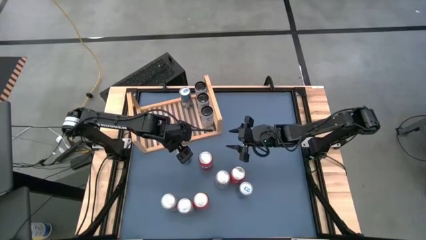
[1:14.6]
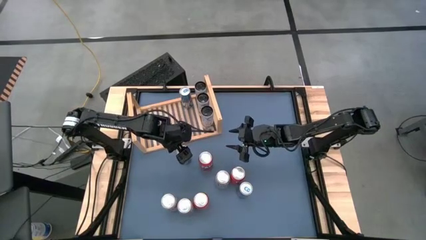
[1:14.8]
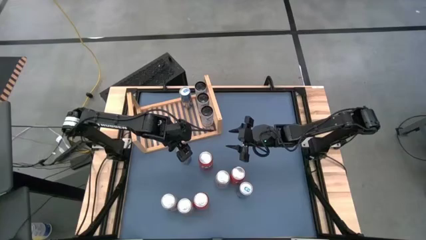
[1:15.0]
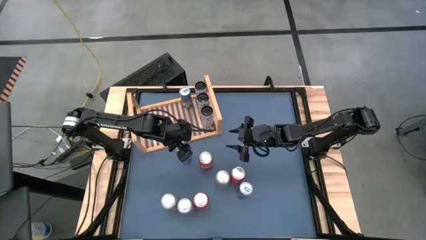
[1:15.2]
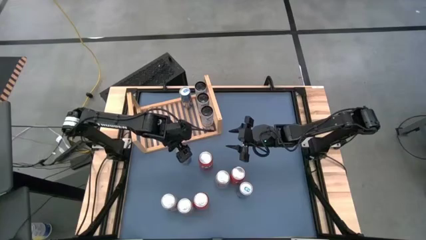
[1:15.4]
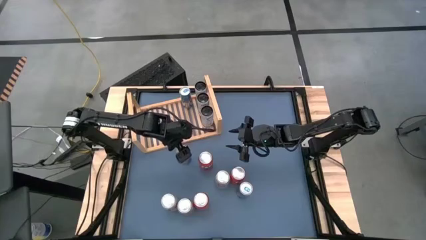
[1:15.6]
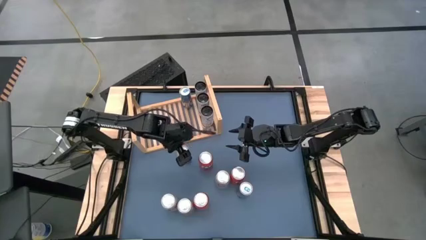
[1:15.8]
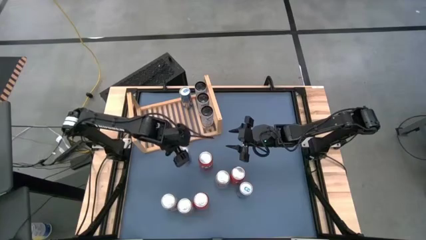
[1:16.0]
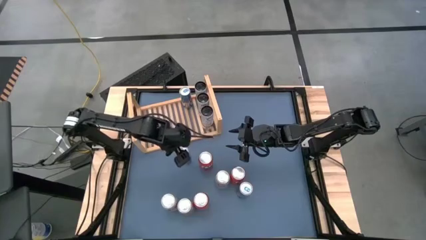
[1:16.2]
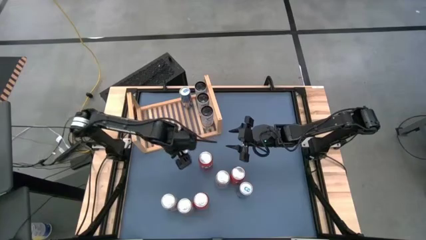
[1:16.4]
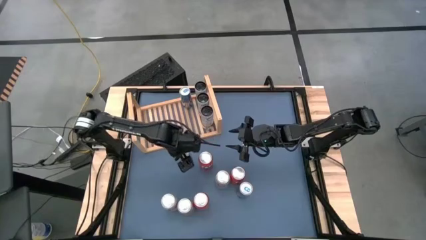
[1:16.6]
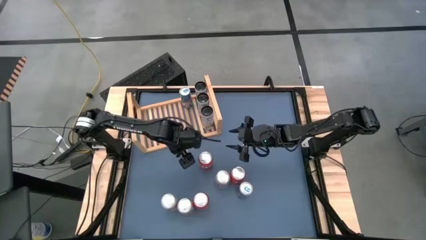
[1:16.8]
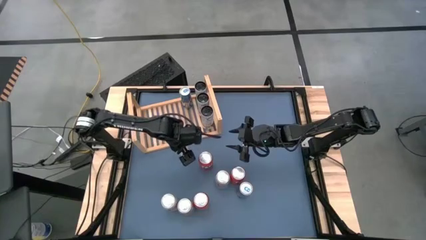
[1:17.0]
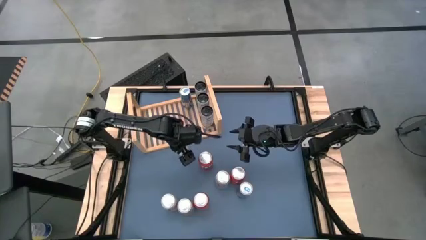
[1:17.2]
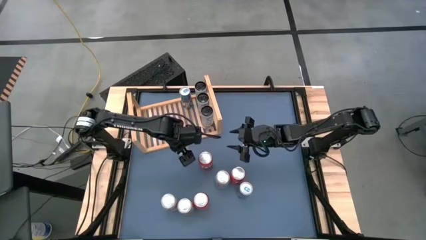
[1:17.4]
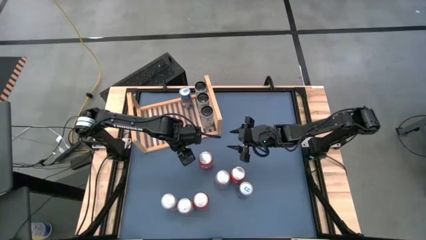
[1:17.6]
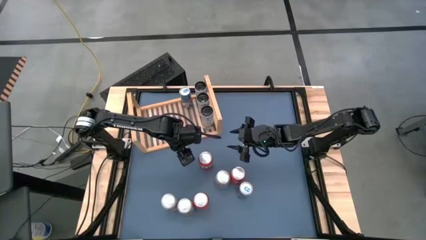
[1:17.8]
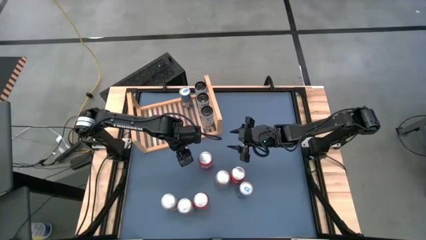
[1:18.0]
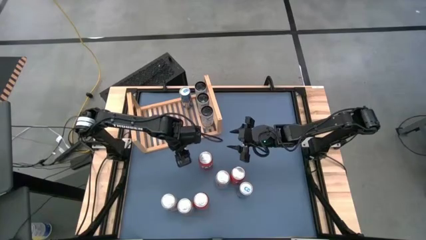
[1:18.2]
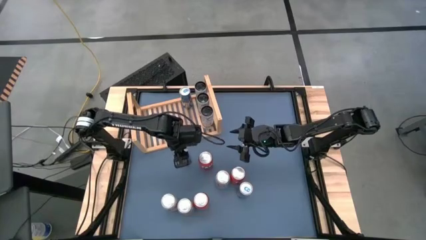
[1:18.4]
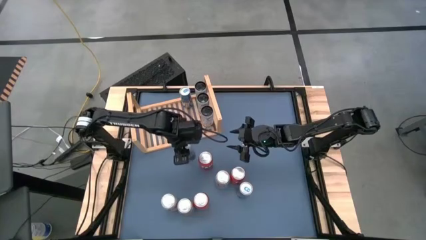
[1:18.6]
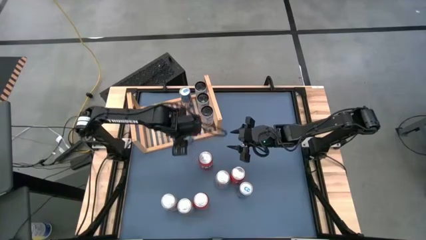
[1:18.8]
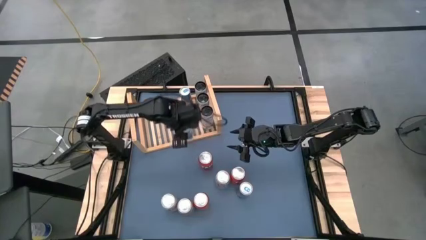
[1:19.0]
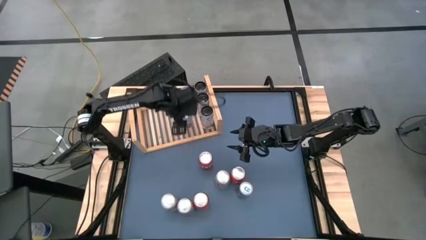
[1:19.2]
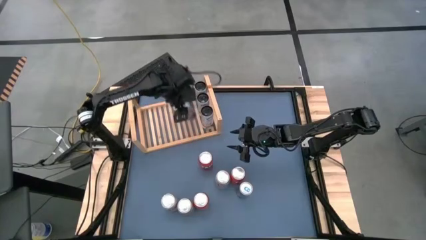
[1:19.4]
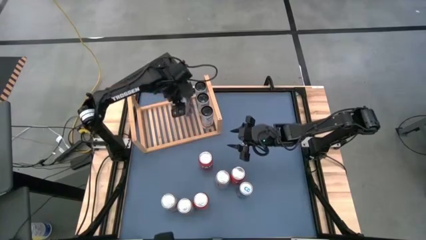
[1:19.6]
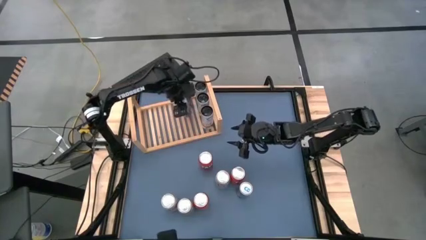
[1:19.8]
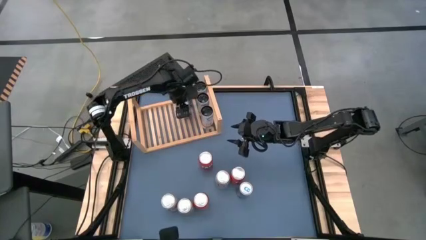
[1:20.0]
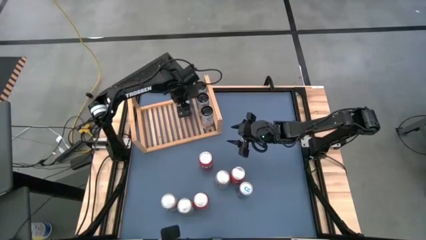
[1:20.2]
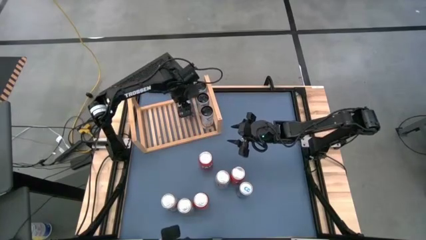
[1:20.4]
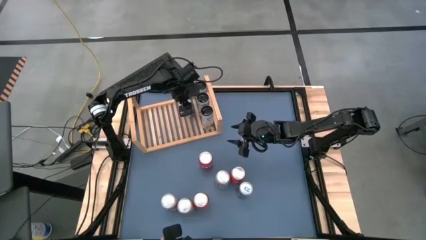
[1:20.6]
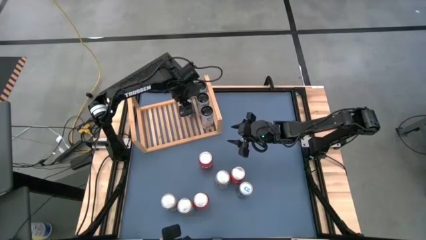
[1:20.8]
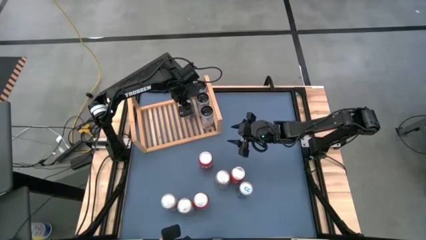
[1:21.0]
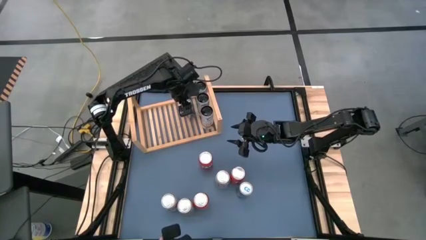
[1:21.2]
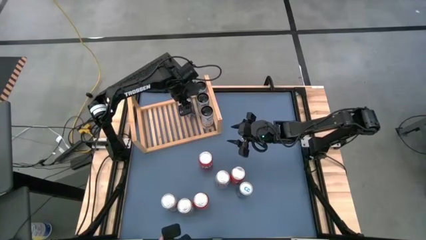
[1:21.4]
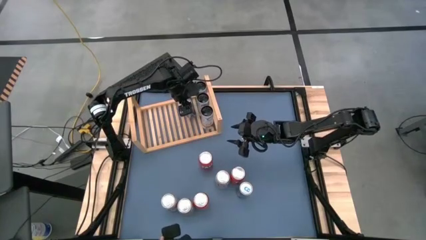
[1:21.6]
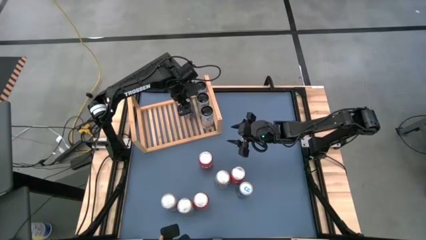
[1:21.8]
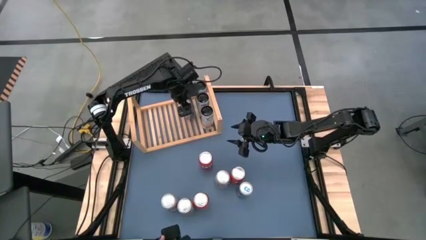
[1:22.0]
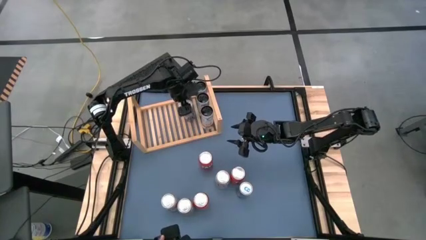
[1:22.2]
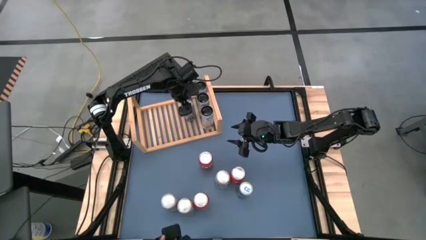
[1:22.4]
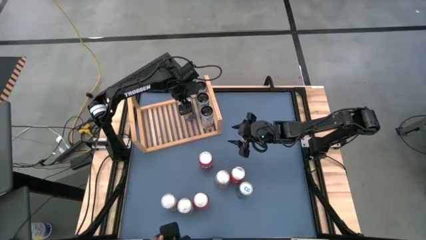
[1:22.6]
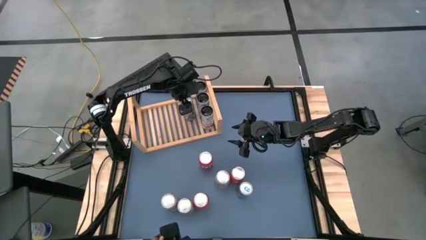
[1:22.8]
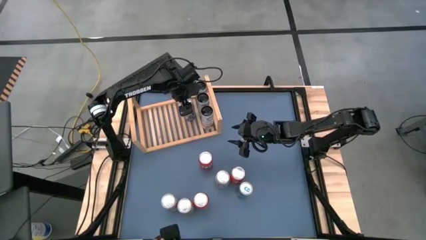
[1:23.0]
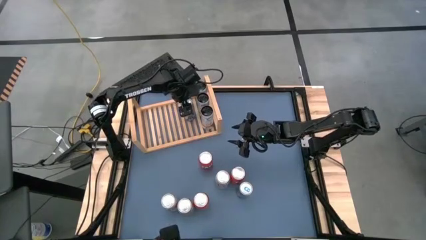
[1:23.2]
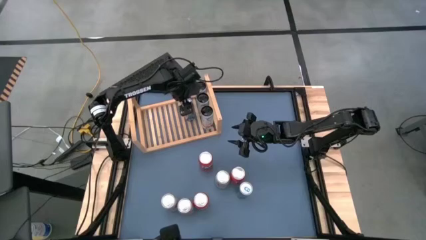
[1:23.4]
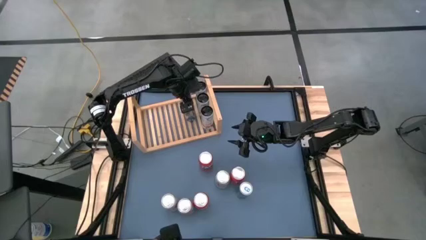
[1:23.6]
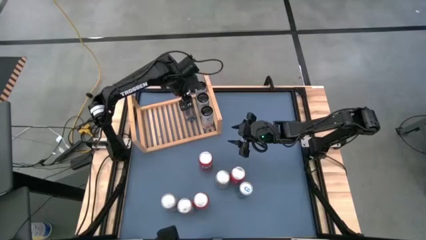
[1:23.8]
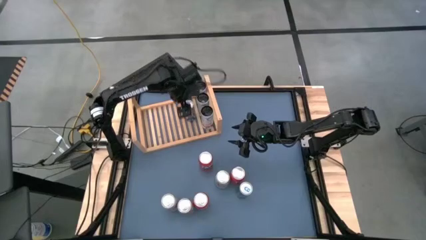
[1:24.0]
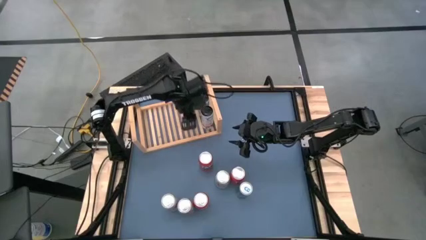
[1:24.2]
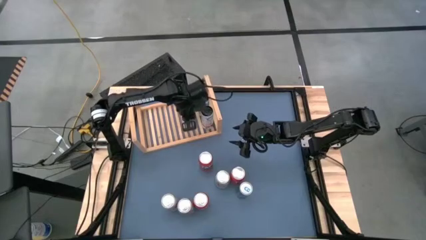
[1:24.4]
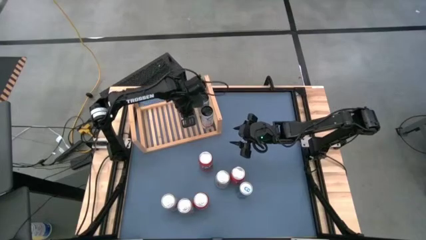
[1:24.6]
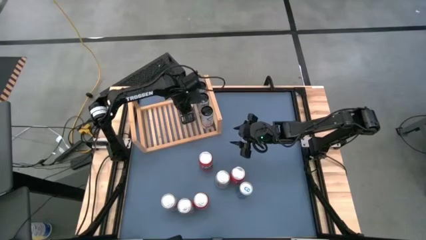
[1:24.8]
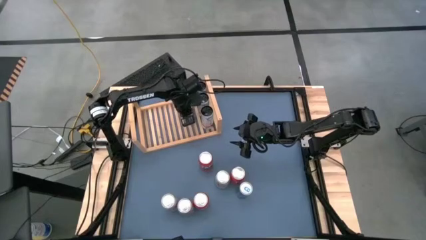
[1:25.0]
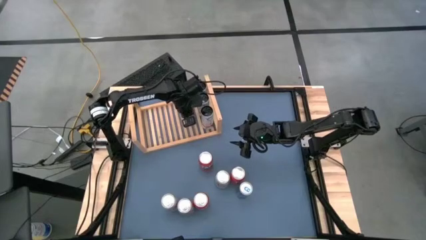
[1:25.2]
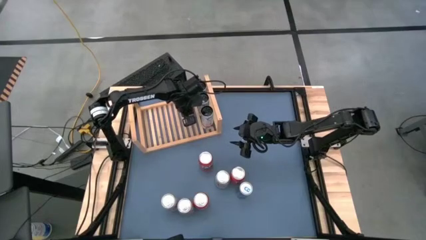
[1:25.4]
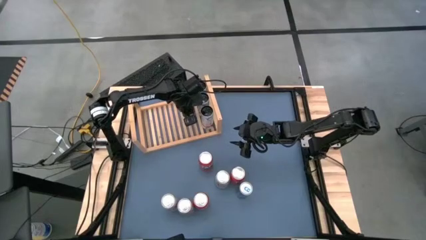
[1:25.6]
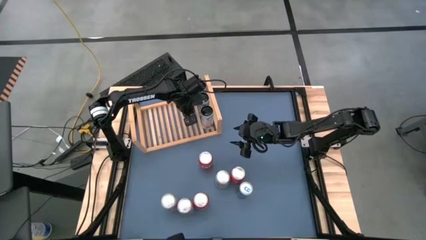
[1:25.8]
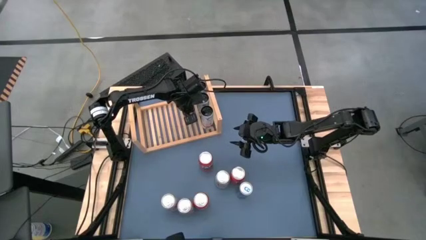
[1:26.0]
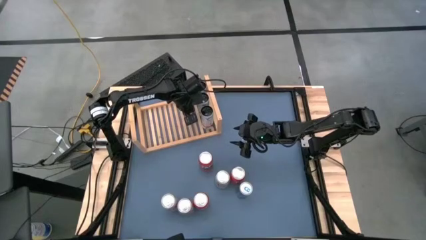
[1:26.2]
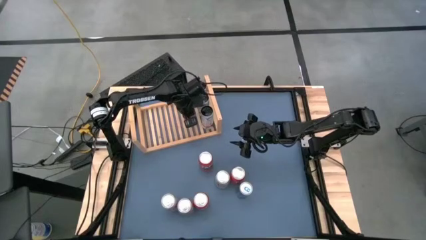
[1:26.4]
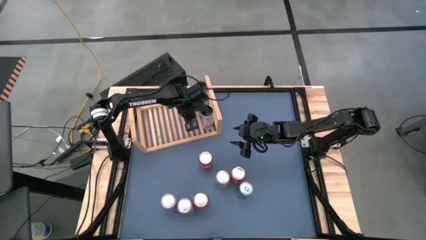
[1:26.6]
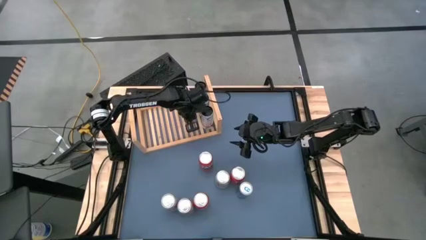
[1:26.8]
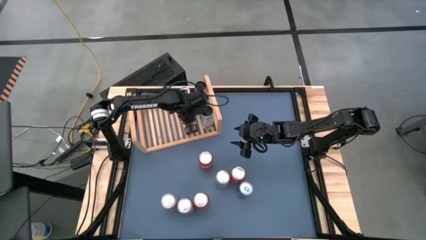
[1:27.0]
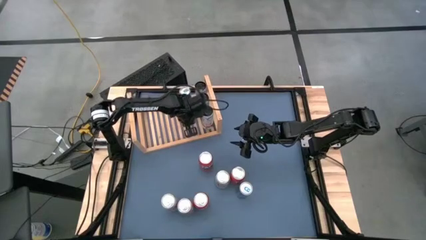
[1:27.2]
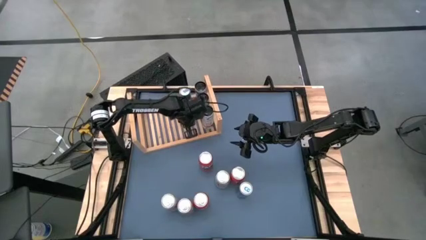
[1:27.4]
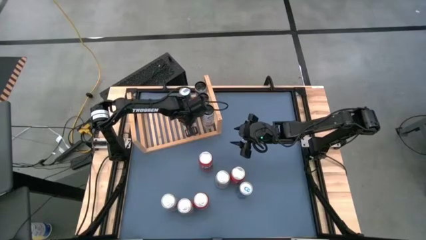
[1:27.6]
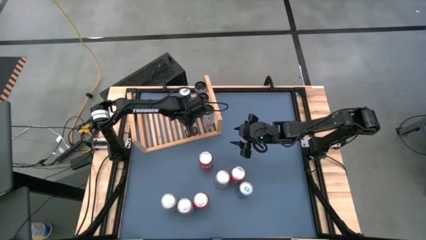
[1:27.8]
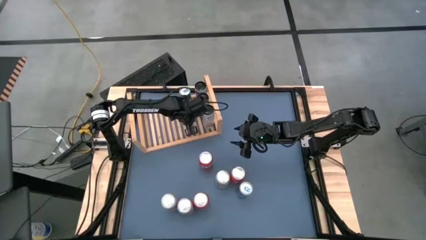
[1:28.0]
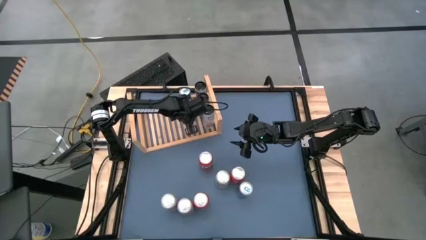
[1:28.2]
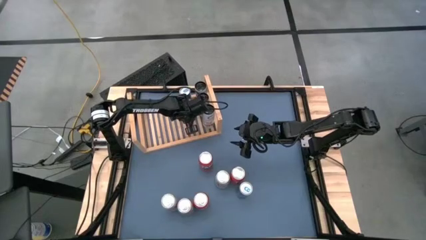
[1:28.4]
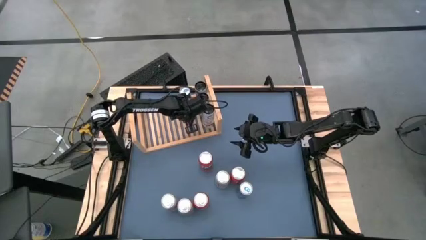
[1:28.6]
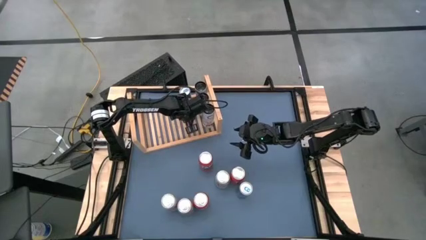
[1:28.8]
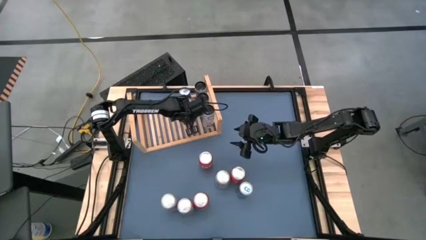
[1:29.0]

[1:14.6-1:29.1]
Task: Place canned beverage on shelf
Put the left blue soda can on the shelf aligned with the other blue soda can

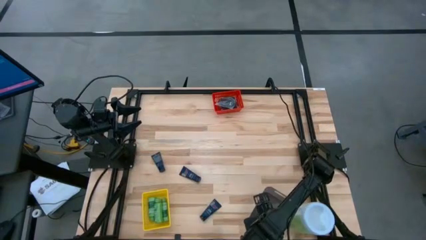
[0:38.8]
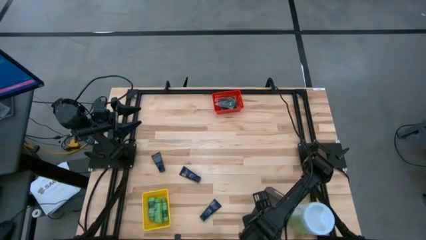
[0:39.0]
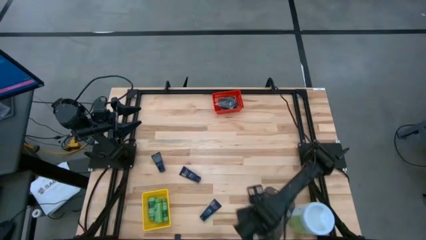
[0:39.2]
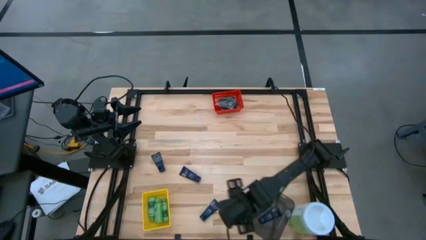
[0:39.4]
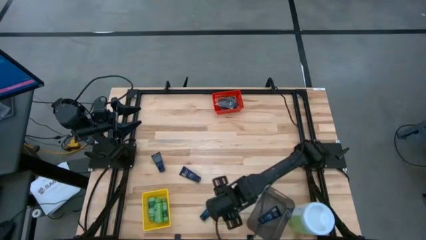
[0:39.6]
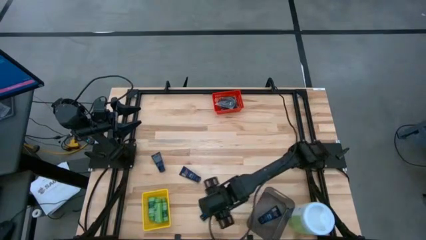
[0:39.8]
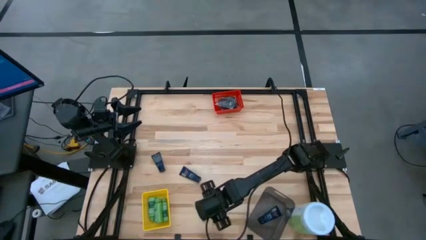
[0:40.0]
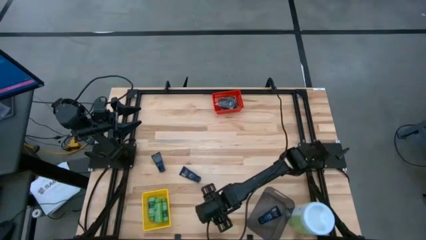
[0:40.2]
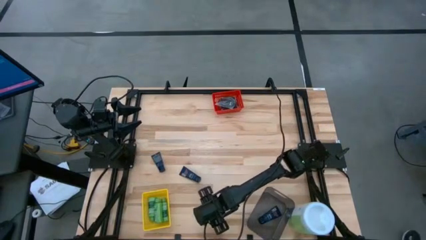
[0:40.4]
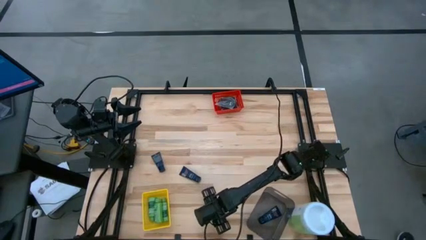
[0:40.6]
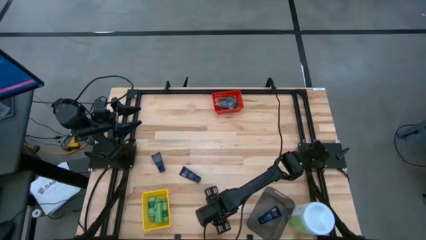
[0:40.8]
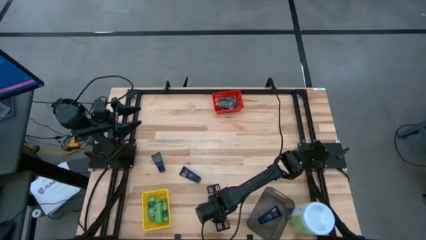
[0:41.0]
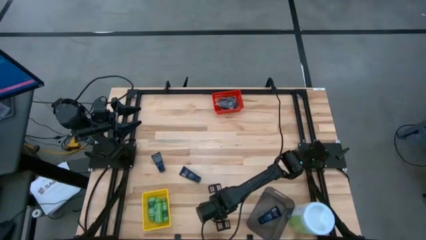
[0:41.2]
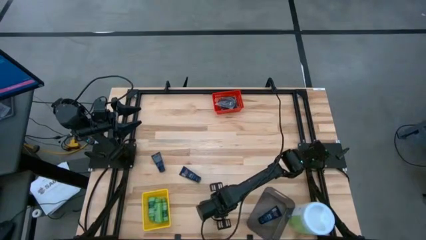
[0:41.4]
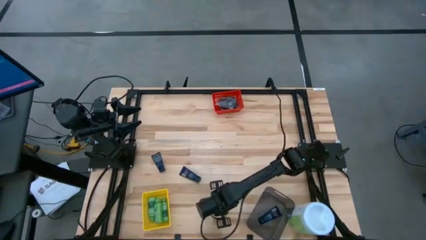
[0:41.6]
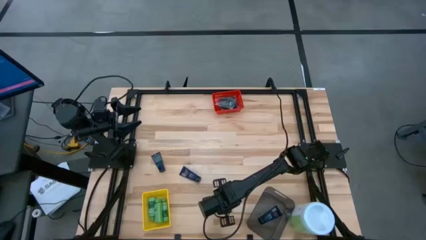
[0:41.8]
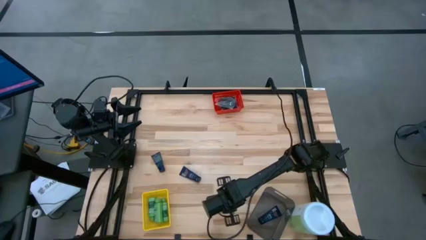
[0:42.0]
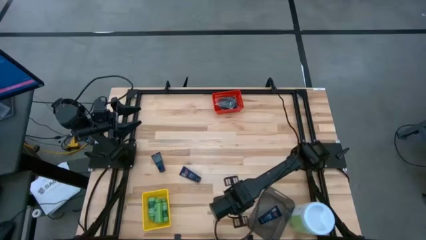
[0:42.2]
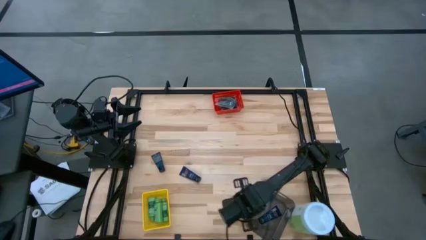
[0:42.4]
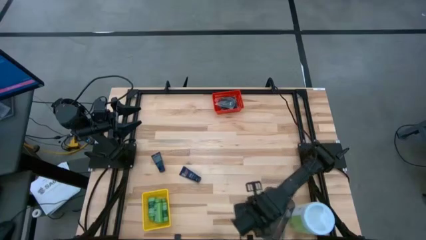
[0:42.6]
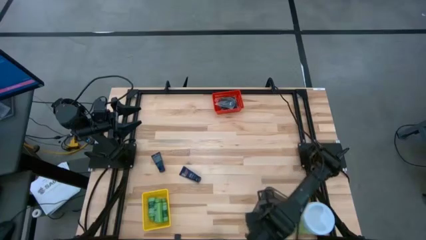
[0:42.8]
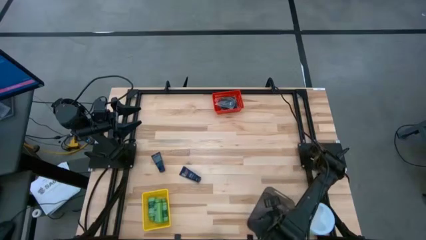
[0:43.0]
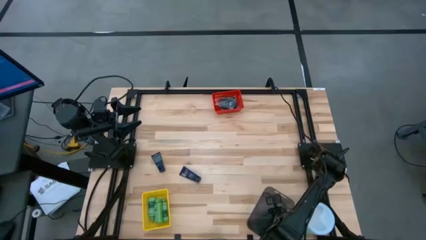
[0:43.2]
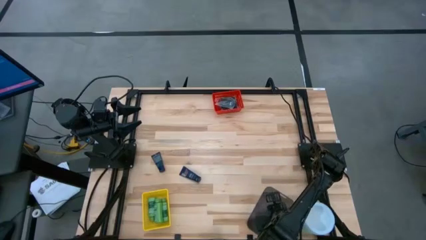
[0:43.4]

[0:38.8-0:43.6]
Task: Pick & Place Travel size toiletries
Put the blue shave cream into the black bin
